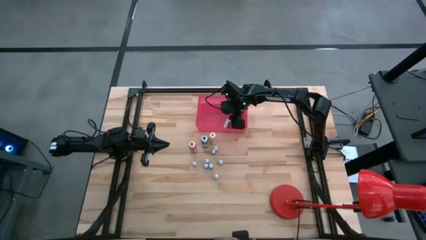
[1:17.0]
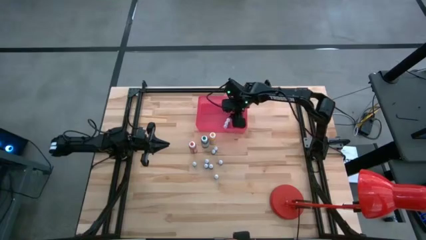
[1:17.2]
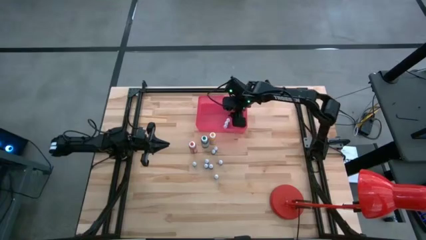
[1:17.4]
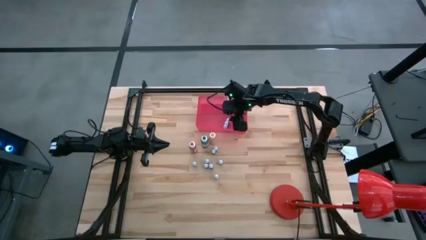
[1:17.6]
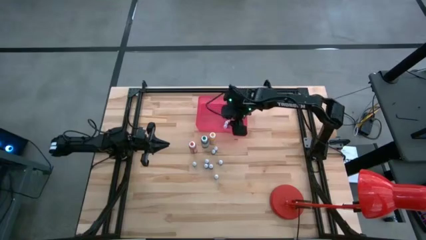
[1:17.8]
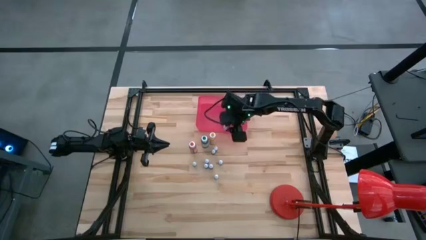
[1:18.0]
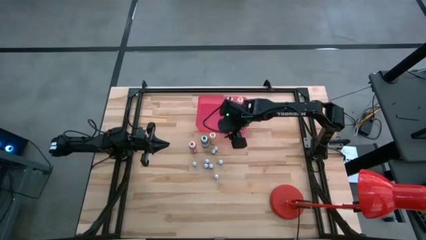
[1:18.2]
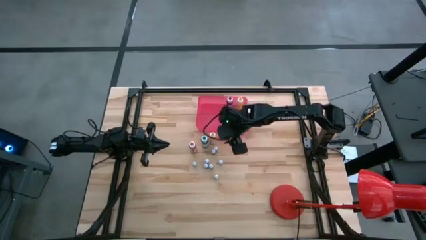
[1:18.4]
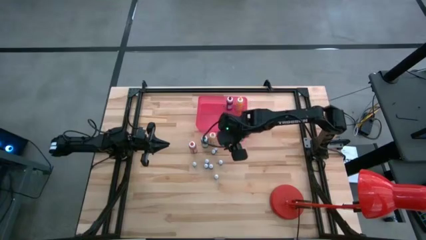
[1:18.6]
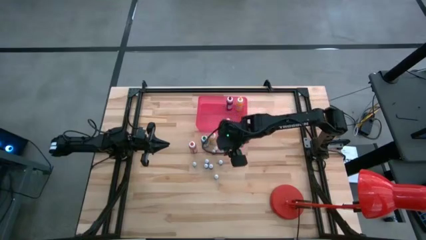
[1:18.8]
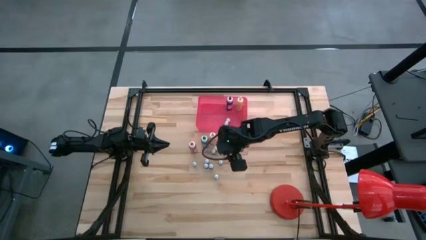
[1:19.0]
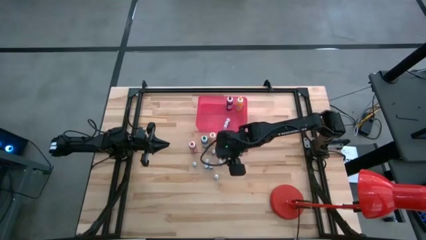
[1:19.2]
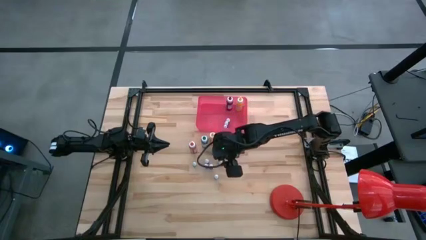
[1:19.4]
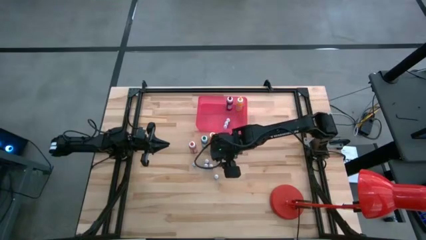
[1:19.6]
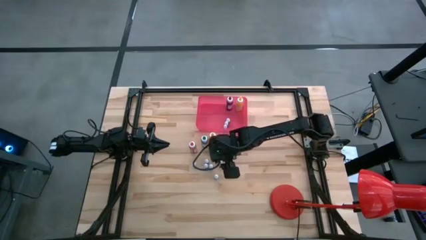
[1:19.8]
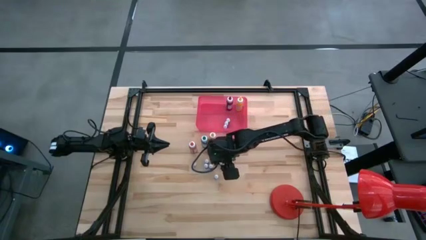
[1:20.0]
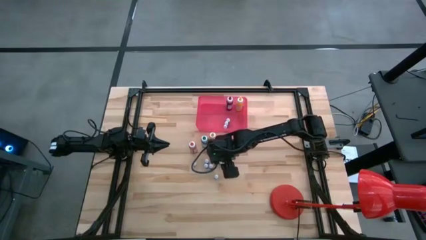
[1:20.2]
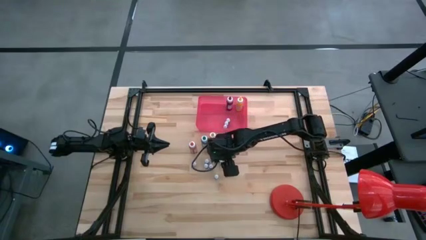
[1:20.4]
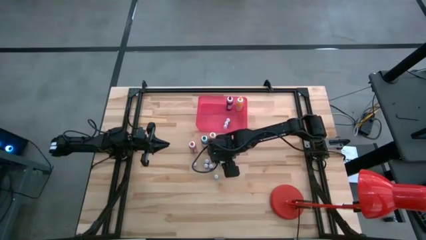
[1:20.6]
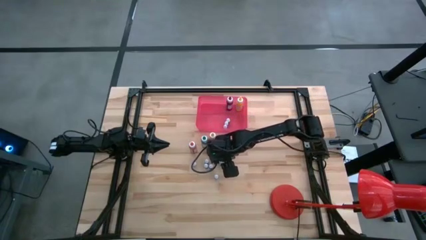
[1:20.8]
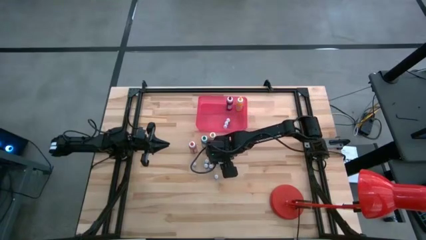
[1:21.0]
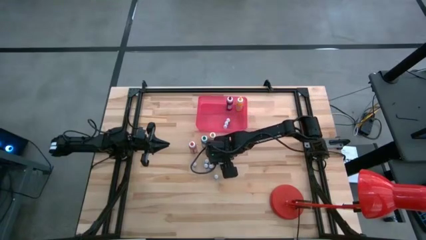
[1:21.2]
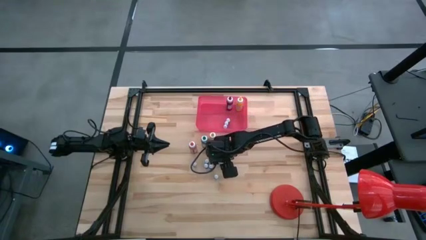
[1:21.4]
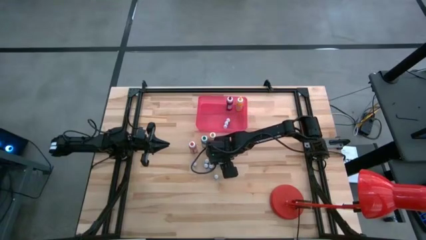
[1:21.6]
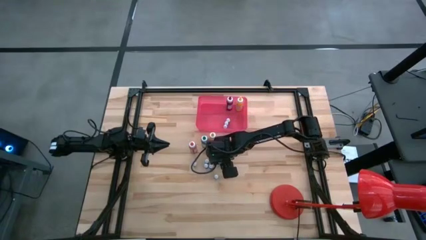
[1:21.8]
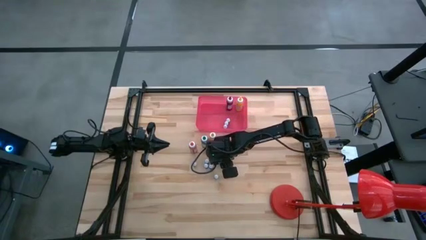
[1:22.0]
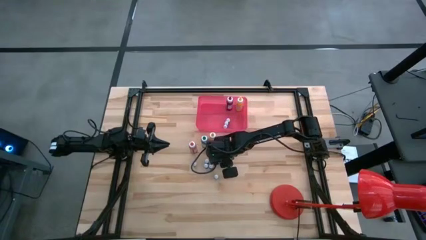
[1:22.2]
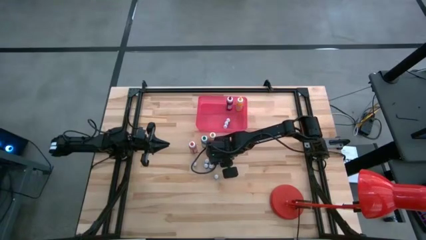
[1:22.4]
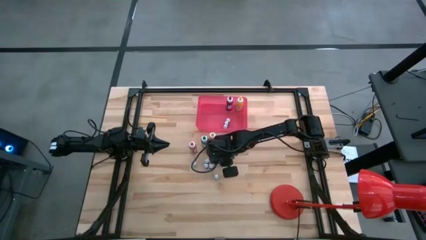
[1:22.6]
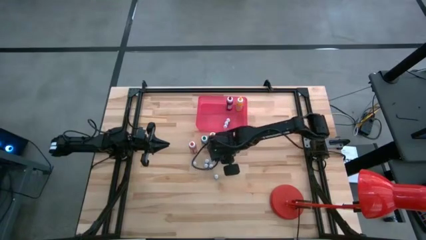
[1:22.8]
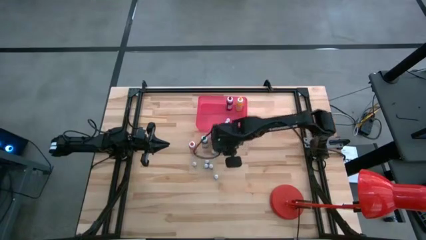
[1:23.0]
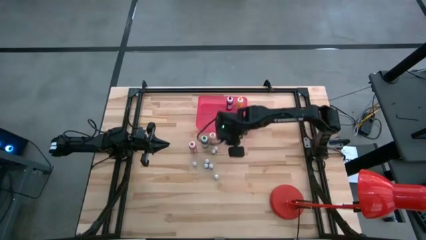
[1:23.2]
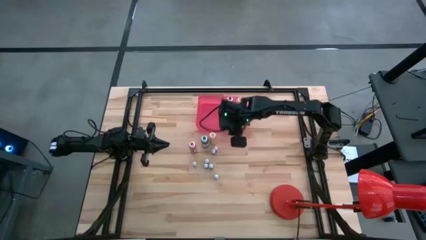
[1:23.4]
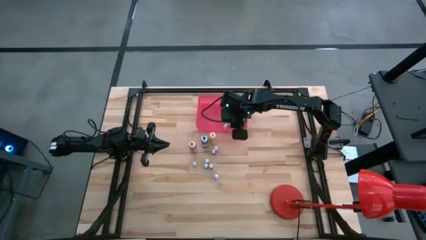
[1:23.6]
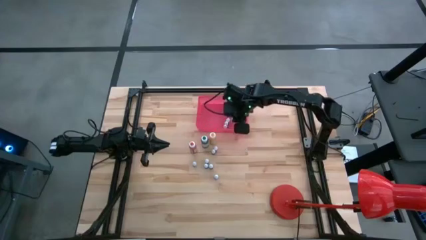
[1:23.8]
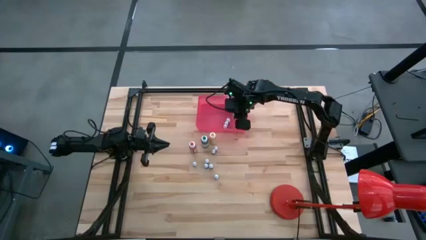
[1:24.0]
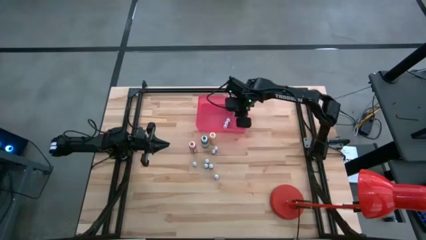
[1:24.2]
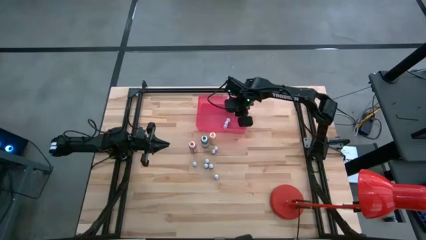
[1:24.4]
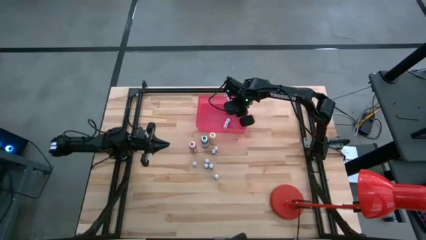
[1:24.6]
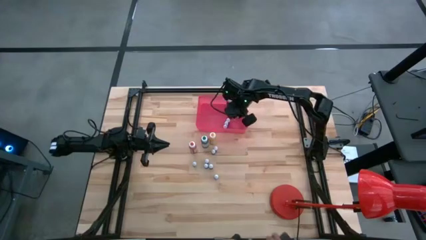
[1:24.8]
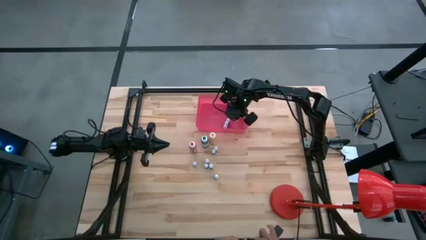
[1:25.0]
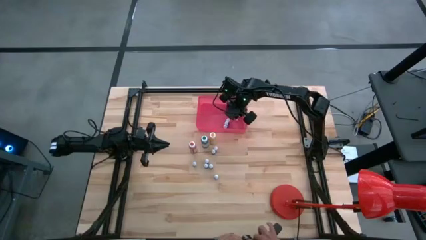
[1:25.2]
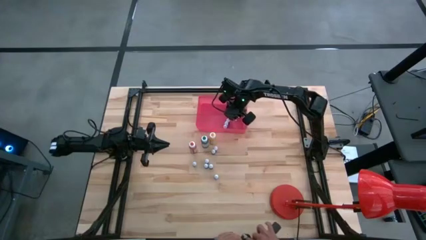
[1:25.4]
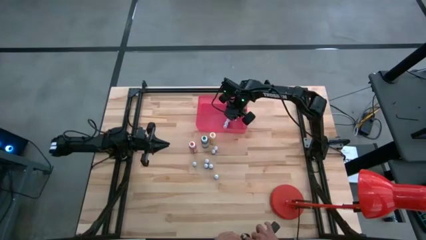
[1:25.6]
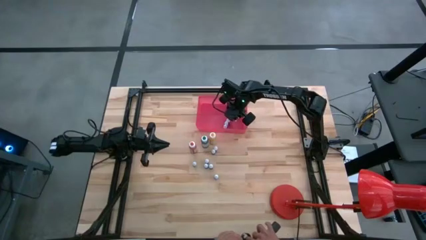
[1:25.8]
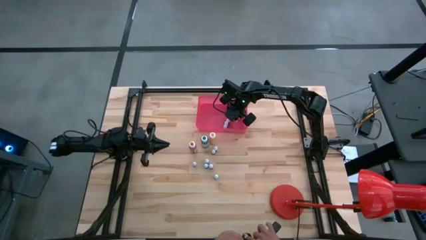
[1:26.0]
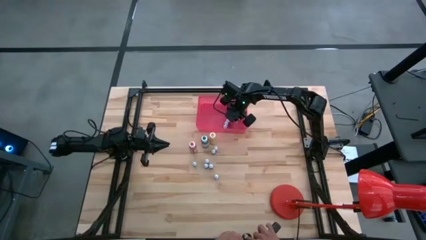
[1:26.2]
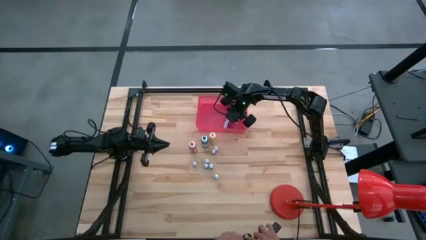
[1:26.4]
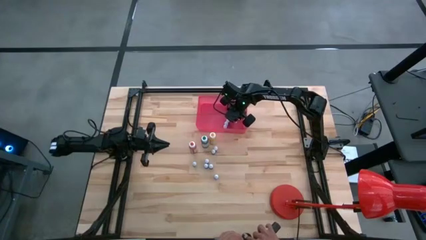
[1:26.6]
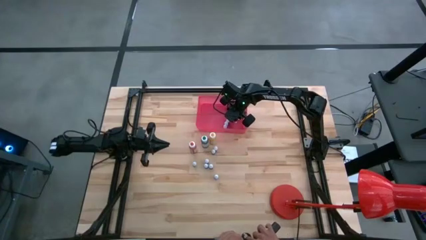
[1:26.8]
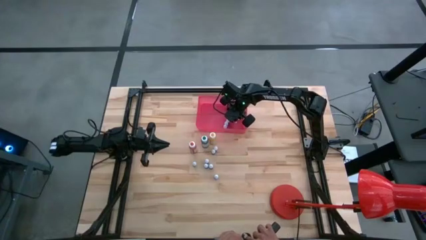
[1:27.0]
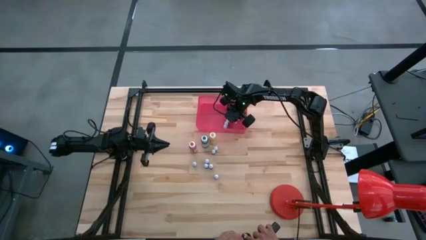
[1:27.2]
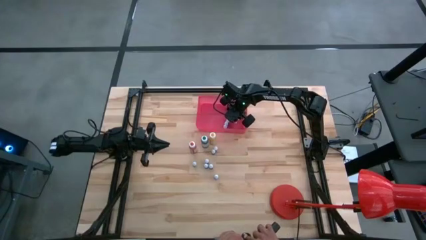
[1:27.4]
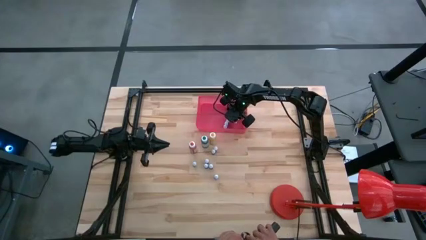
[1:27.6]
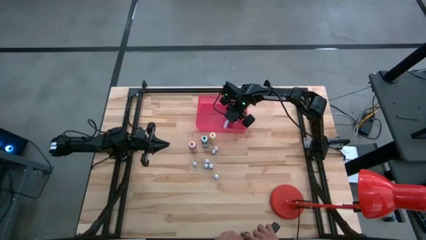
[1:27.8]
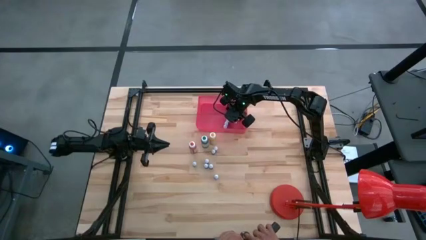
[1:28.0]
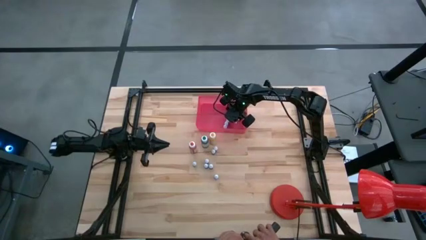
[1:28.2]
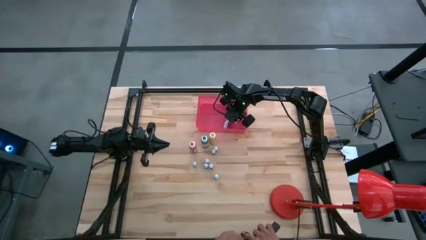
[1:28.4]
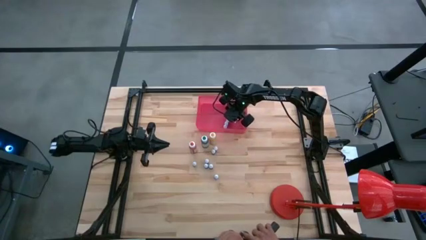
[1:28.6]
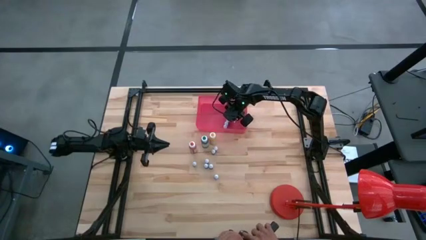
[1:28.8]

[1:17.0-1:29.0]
Task: Pick & Place food coloring
Put the small red food coloring bottle into the pink bin

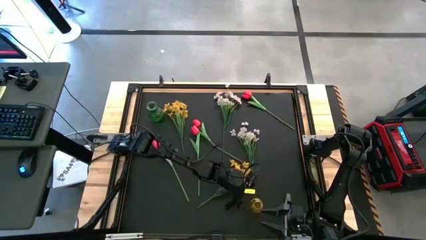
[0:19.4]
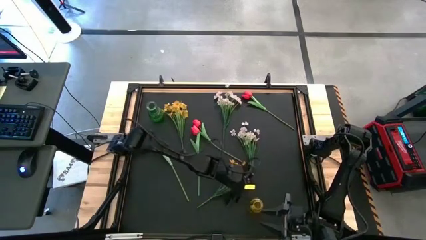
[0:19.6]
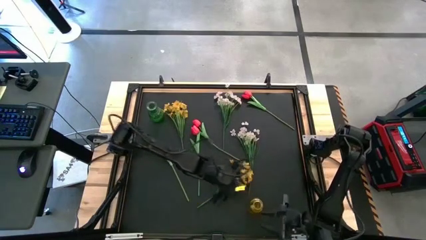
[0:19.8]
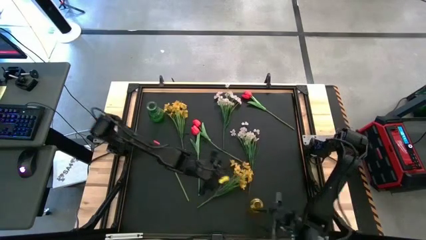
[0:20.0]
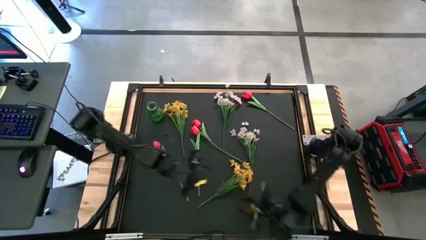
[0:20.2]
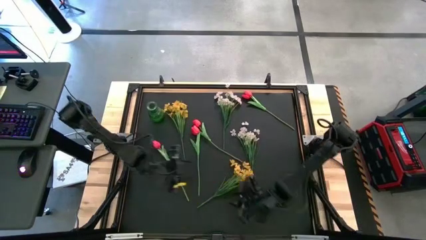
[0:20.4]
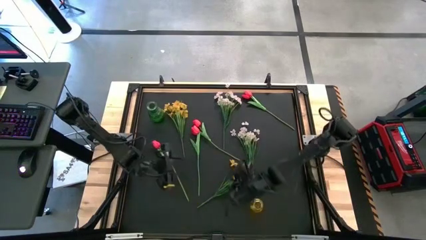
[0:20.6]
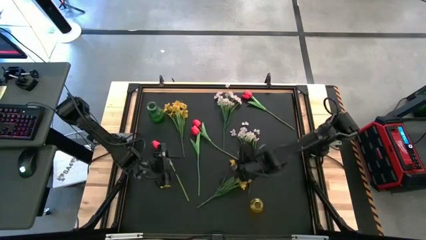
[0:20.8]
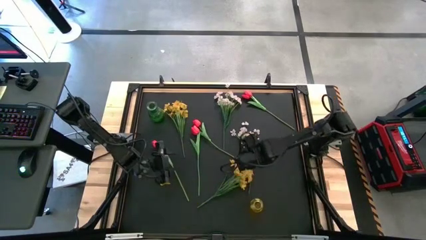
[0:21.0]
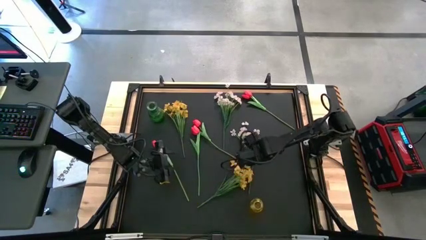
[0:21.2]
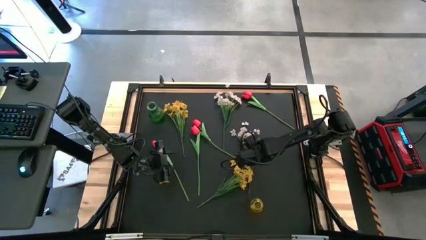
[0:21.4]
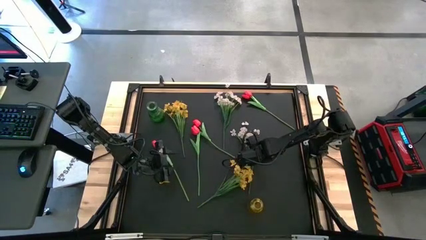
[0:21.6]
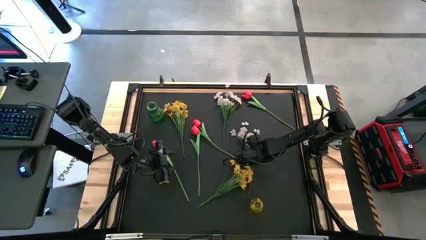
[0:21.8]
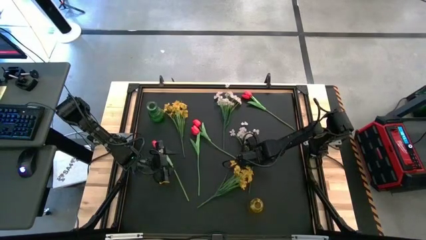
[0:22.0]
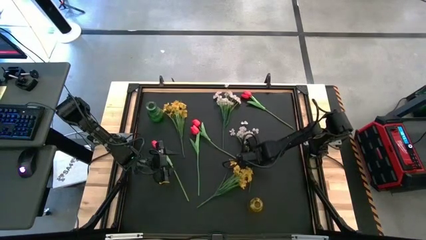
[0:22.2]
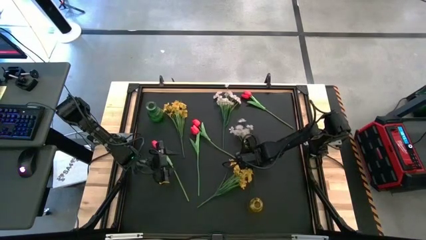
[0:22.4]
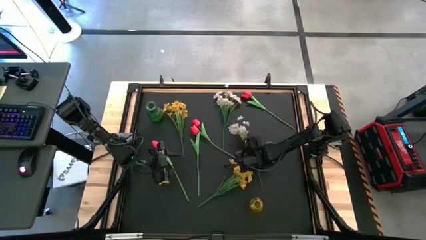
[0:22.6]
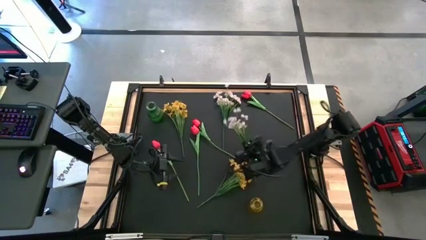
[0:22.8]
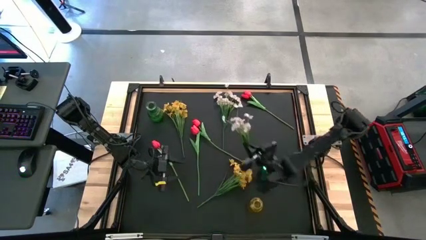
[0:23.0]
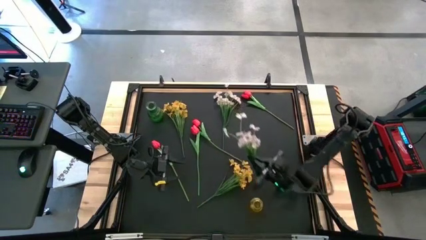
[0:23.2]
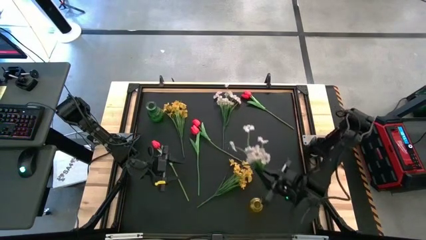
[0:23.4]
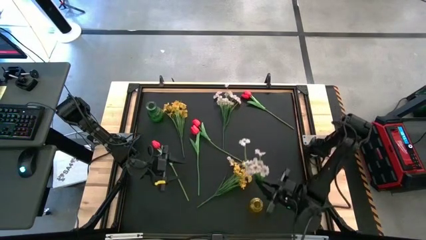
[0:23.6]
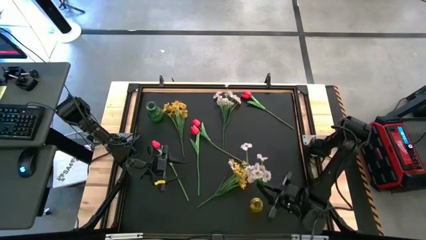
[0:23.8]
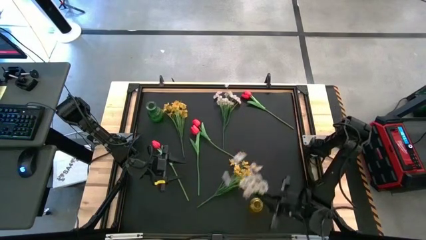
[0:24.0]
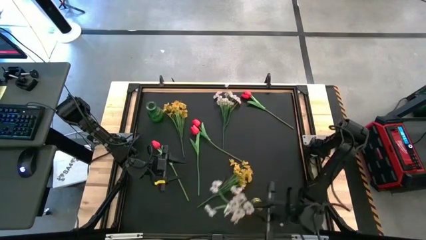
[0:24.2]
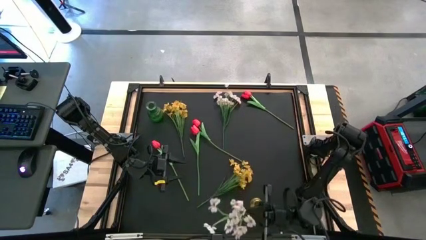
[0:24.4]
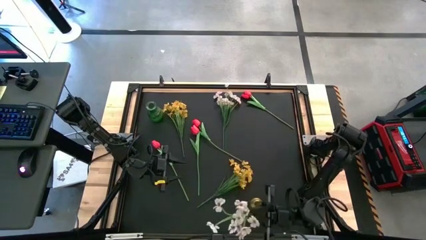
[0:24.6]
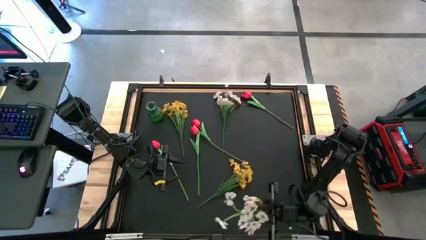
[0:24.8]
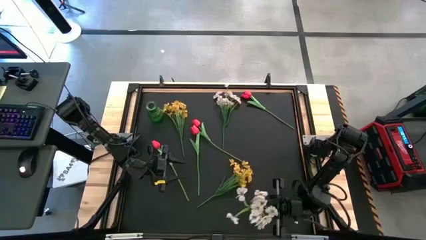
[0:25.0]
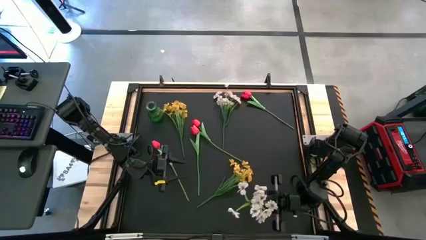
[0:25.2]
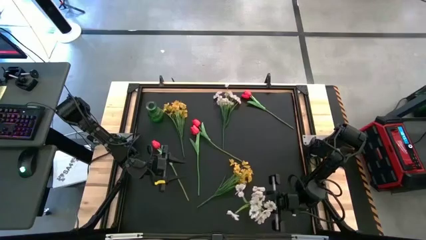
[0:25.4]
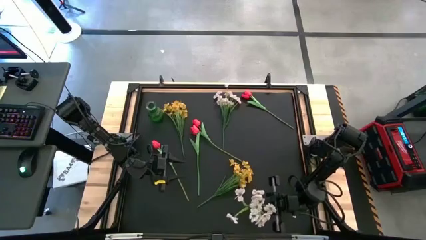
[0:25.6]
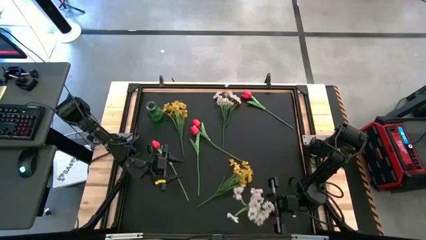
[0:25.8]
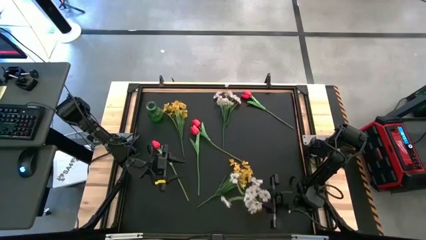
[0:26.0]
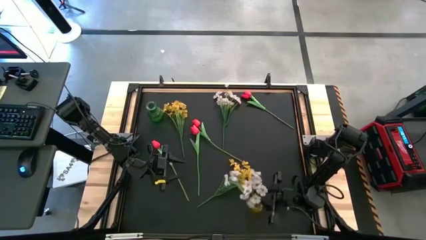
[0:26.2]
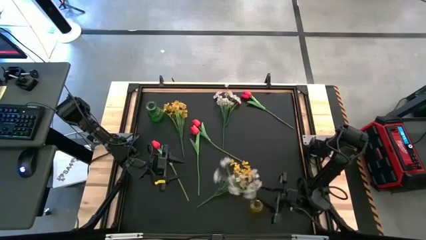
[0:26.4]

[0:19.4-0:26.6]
Task: Sort flowers into vase by color
Put the white flower into the yellow vase
